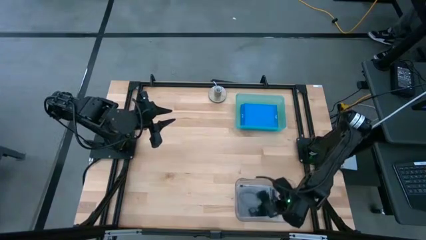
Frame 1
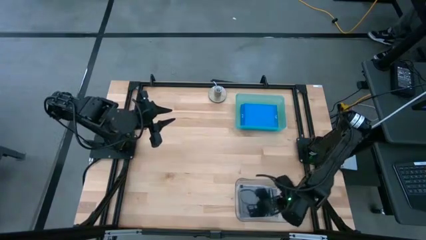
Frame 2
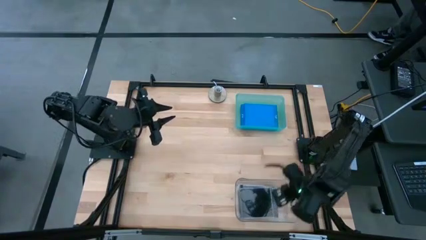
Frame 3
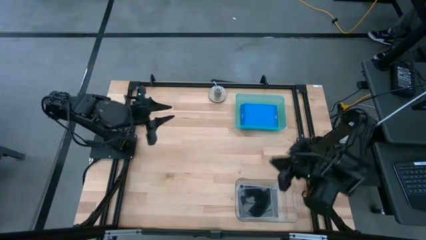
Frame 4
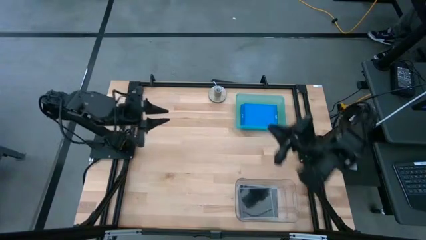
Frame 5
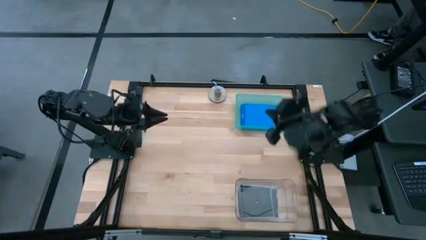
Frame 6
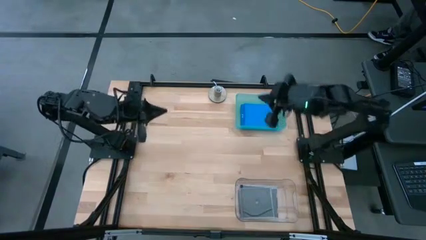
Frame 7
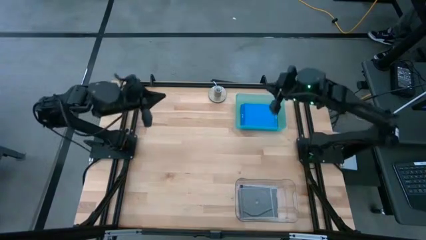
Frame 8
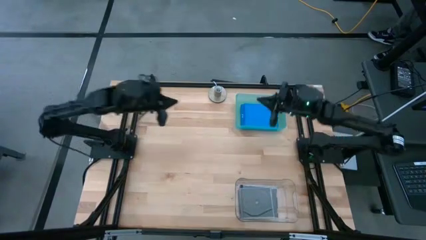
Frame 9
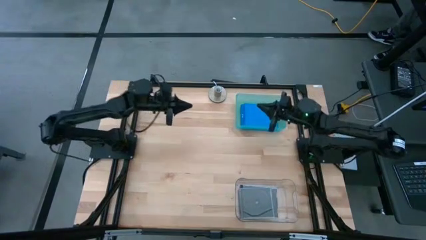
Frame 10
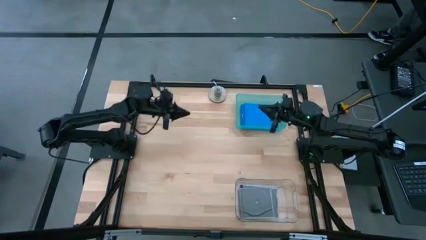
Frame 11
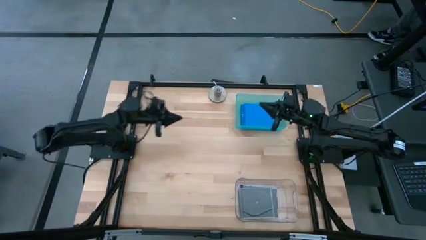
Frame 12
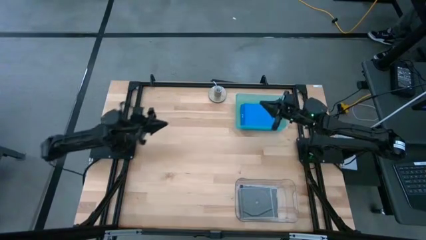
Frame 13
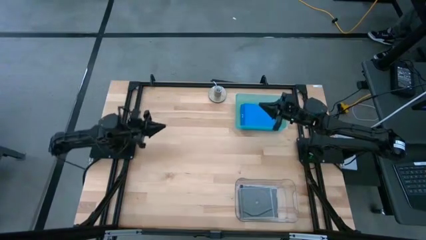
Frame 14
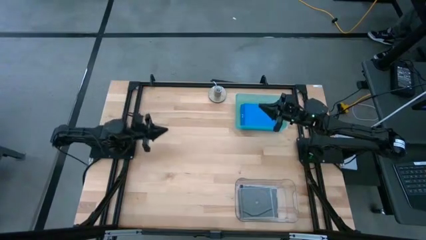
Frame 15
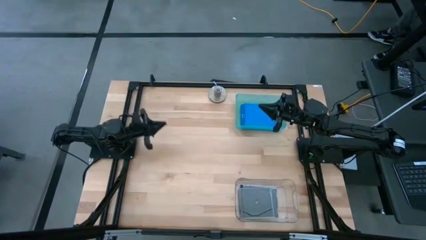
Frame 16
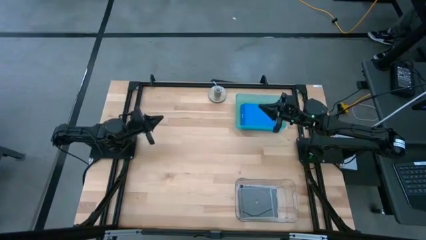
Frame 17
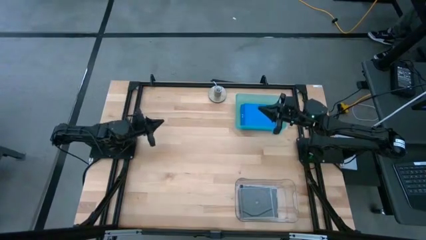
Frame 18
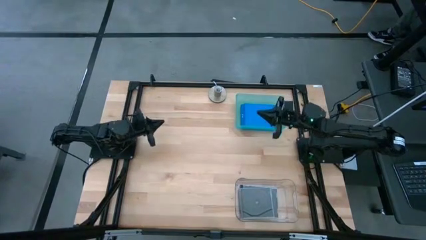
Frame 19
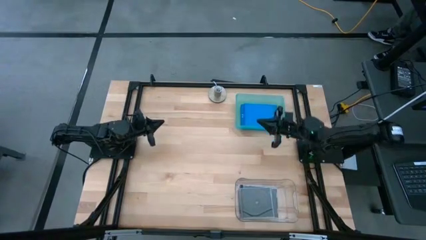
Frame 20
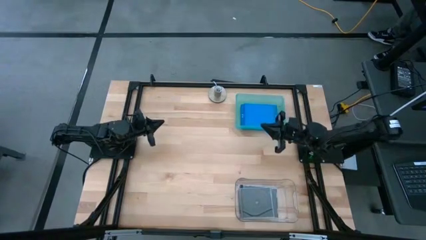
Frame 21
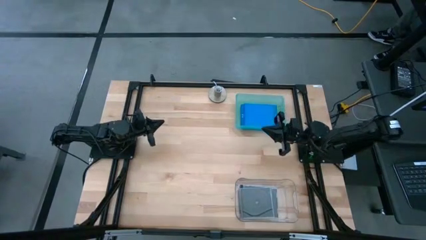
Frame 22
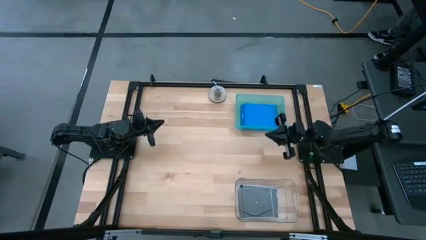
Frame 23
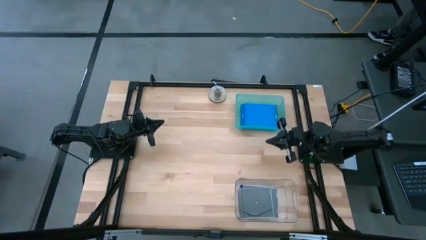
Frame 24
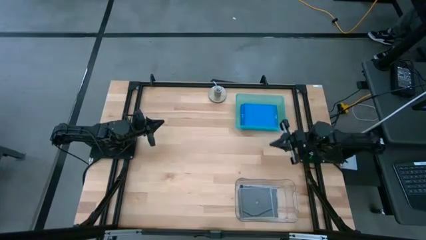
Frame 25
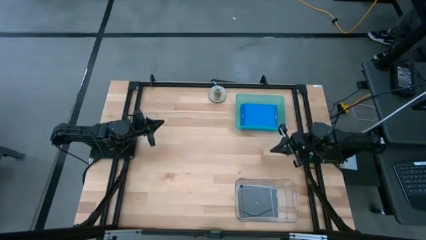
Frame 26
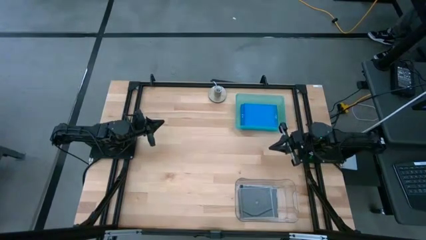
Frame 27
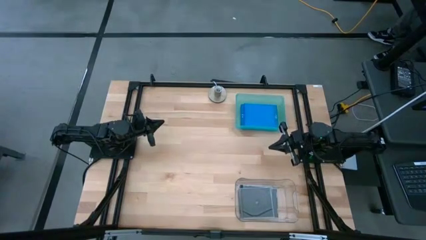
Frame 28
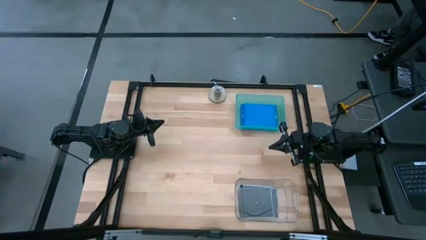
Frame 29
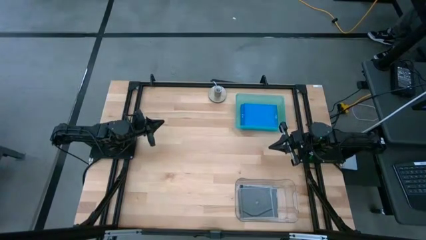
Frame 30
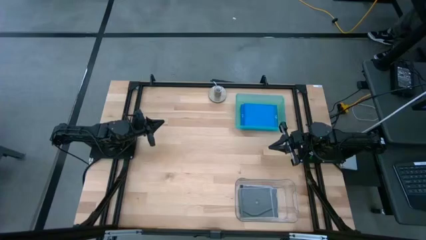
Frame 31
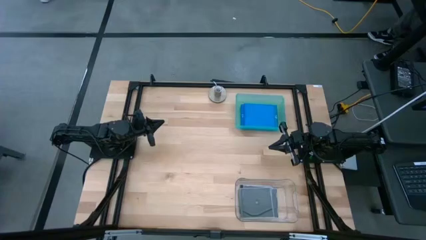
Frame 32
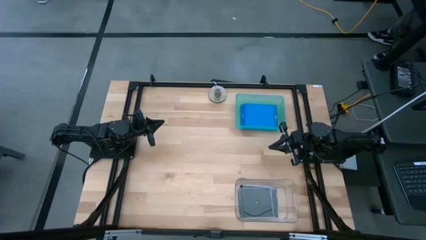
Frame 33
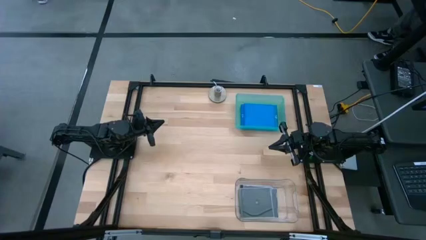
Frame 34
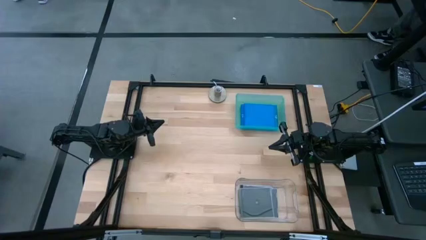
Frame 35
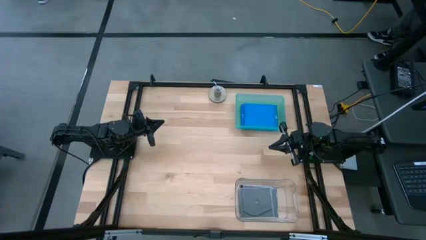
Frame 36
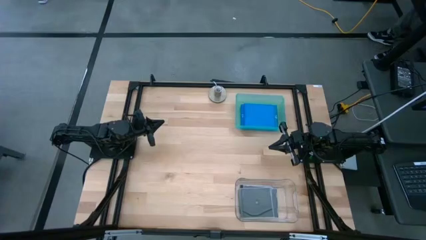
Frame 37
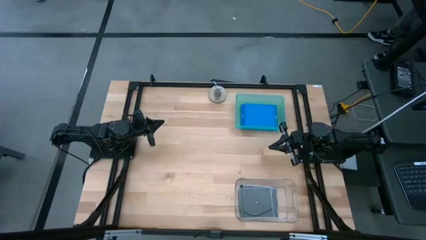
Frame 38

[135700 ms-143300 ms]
Task: Pick & place jewel cases by type
Return to Home Position

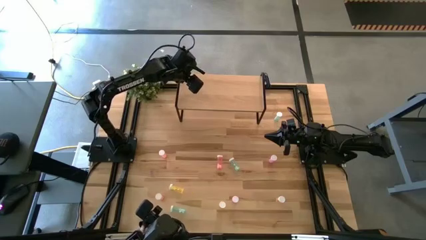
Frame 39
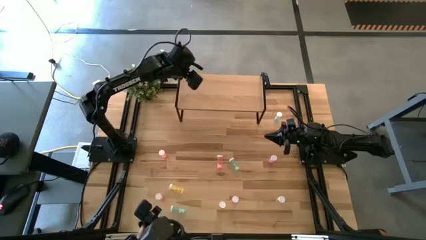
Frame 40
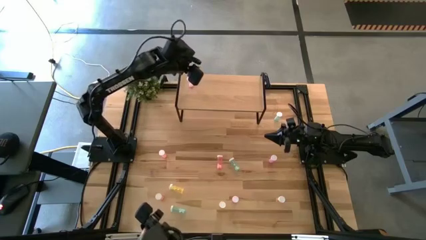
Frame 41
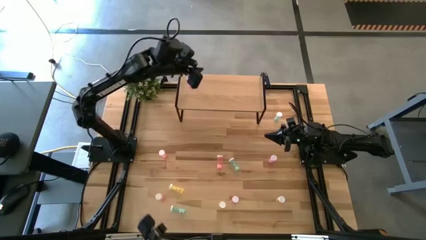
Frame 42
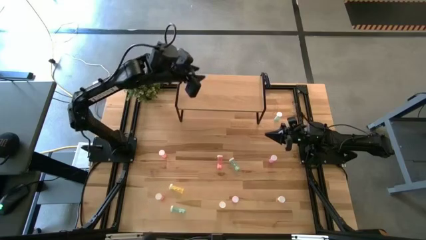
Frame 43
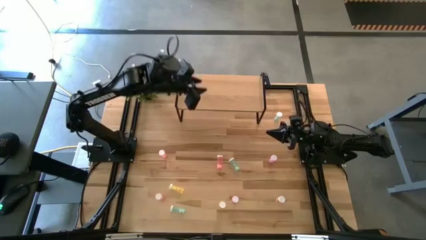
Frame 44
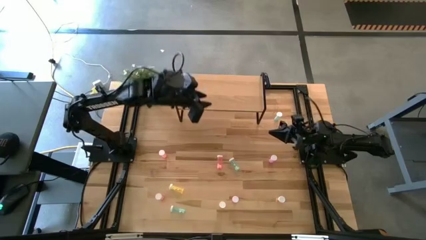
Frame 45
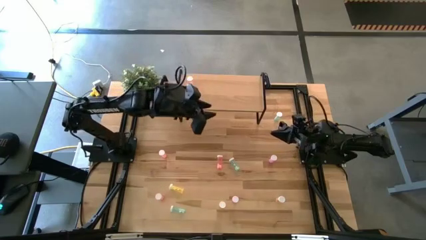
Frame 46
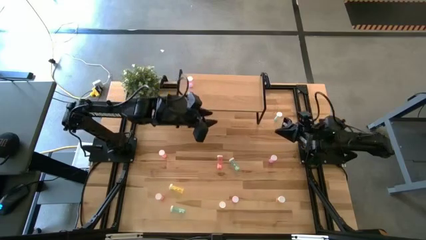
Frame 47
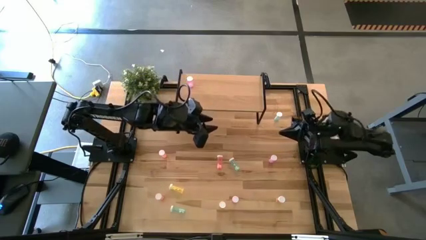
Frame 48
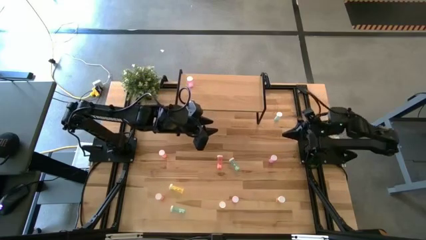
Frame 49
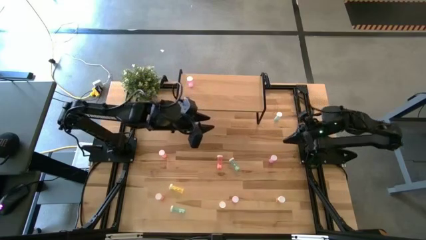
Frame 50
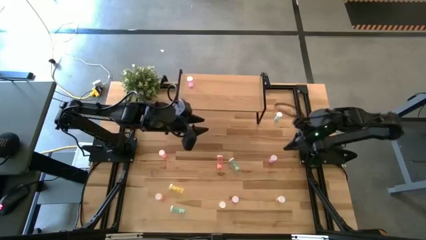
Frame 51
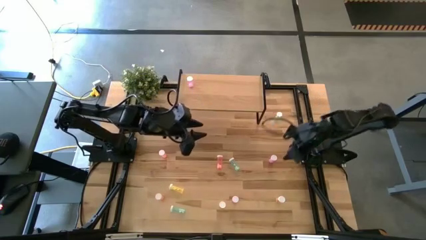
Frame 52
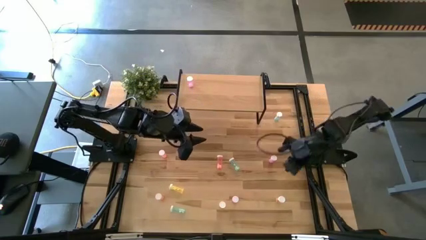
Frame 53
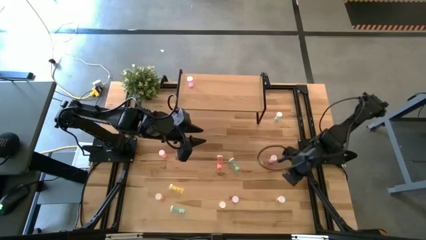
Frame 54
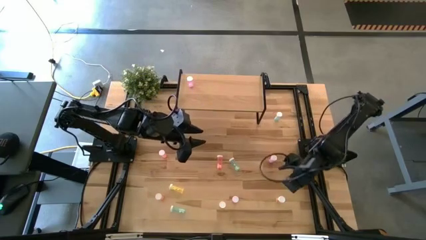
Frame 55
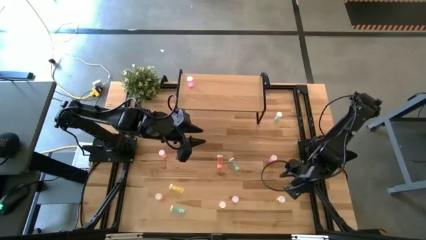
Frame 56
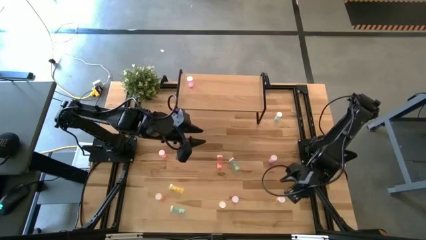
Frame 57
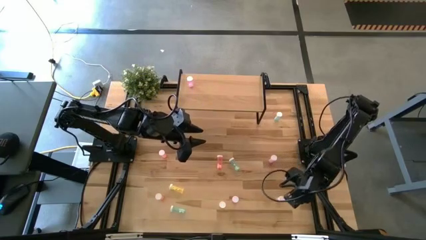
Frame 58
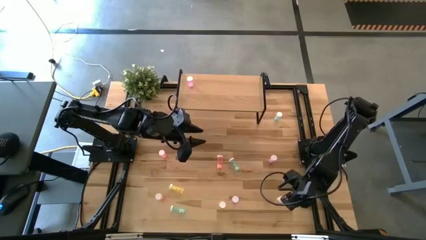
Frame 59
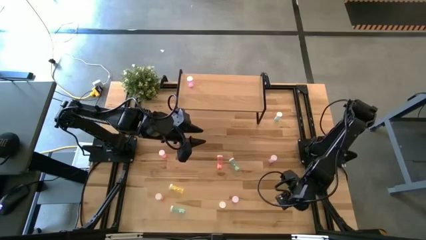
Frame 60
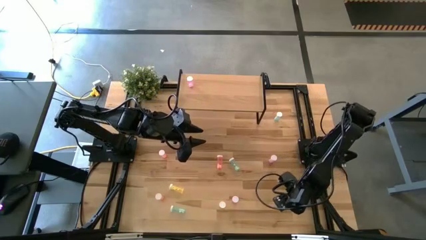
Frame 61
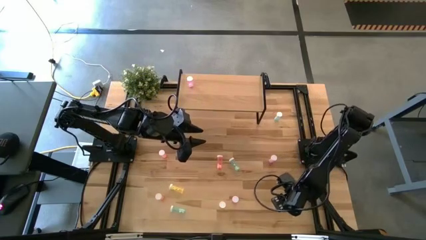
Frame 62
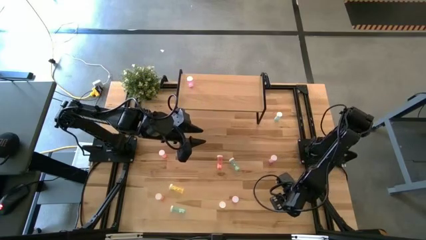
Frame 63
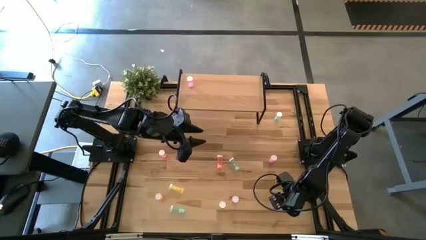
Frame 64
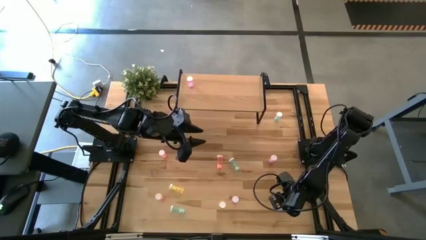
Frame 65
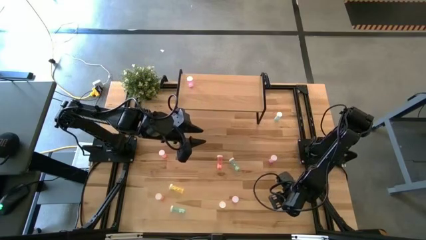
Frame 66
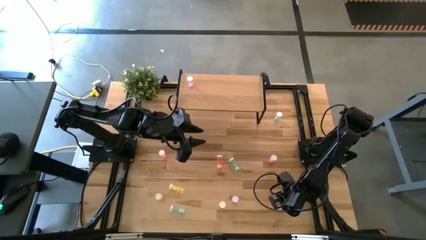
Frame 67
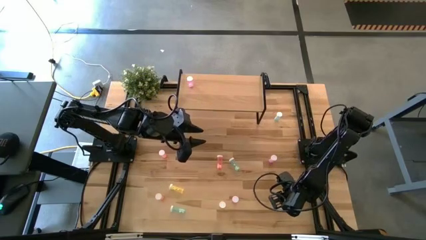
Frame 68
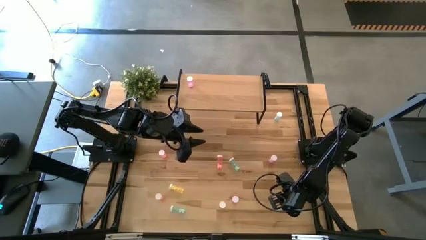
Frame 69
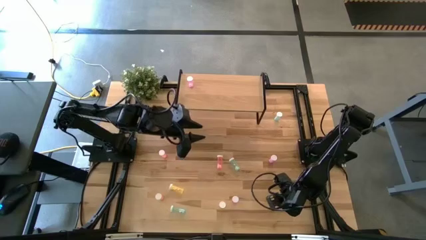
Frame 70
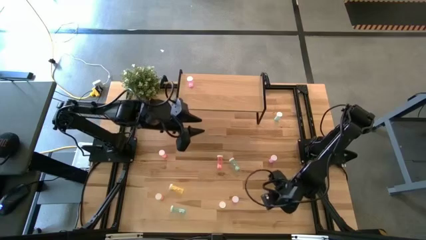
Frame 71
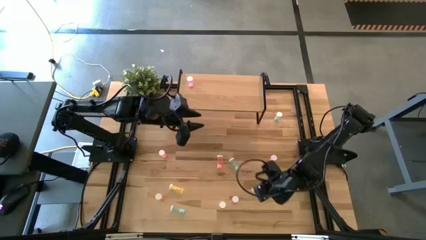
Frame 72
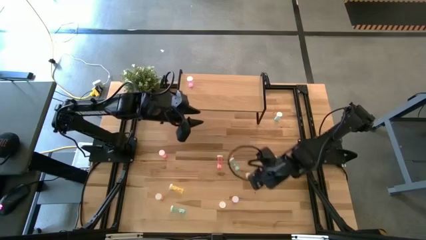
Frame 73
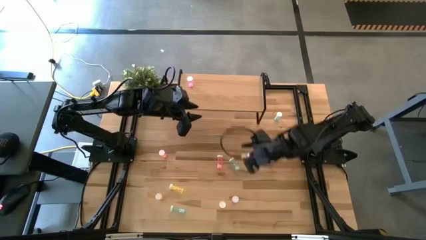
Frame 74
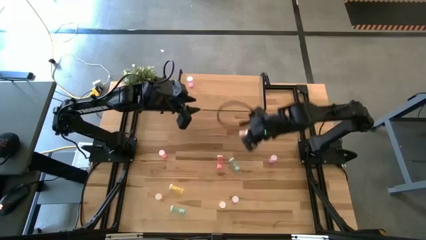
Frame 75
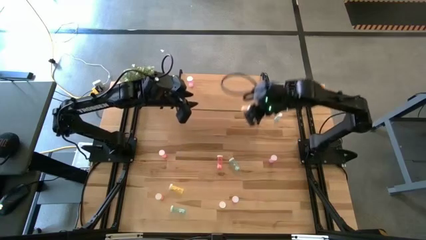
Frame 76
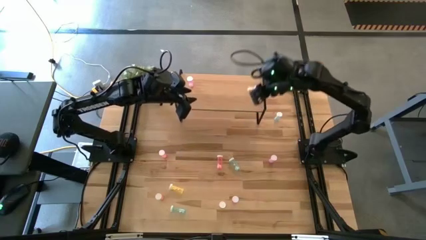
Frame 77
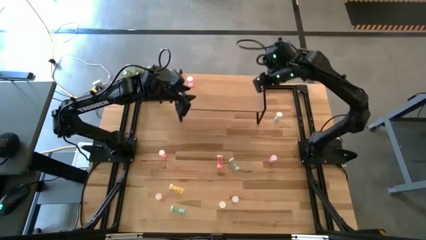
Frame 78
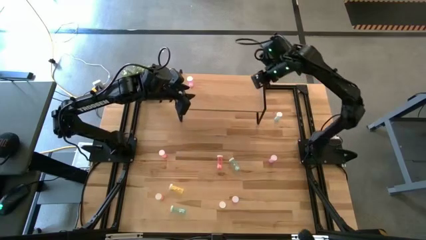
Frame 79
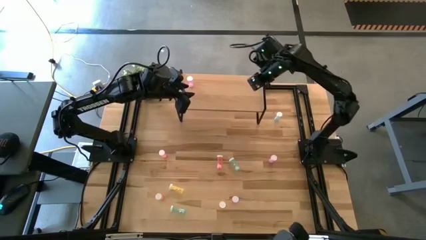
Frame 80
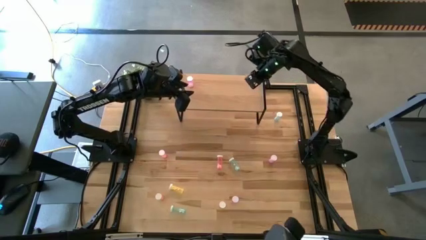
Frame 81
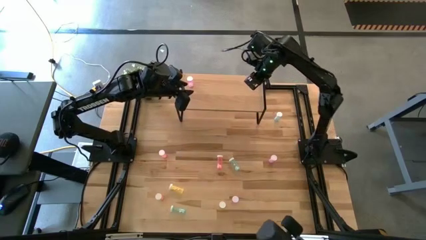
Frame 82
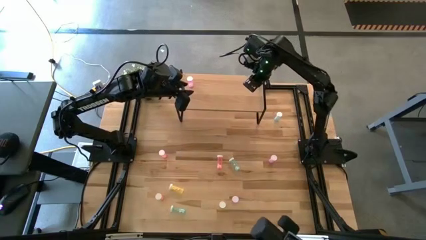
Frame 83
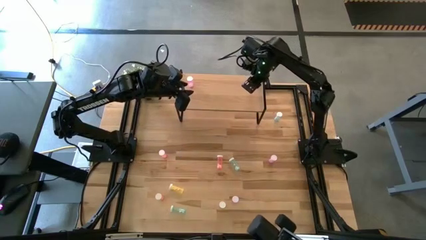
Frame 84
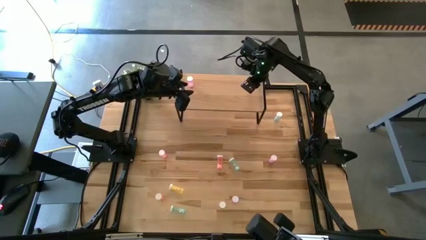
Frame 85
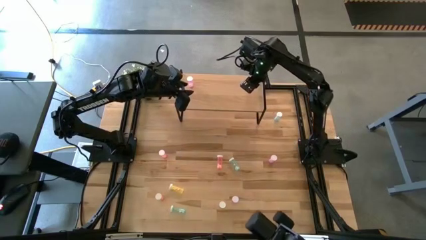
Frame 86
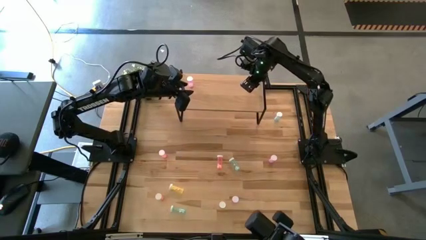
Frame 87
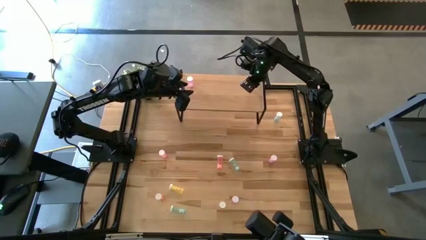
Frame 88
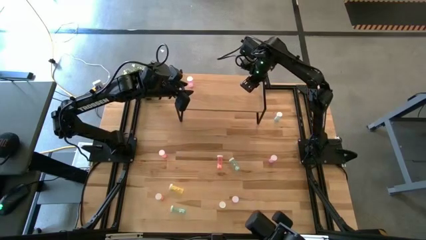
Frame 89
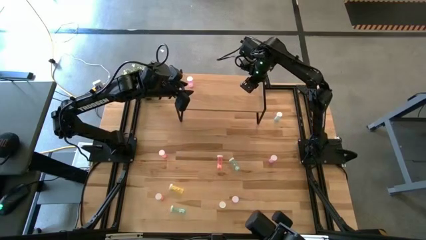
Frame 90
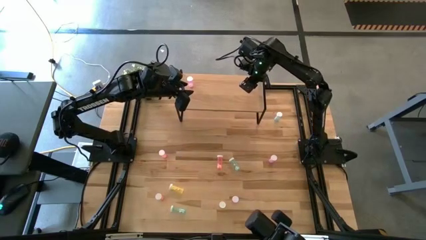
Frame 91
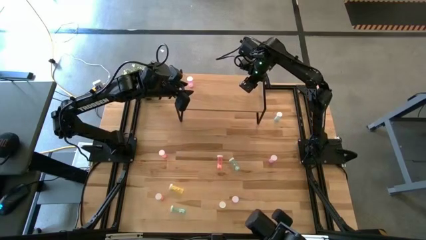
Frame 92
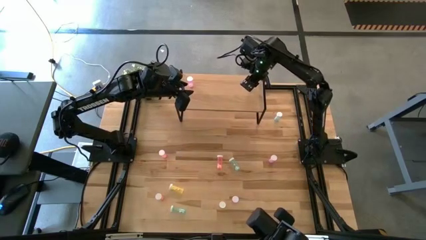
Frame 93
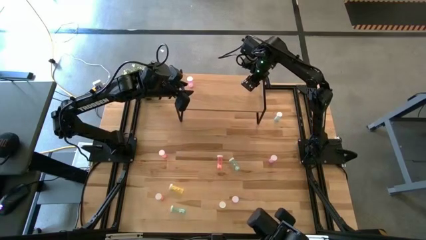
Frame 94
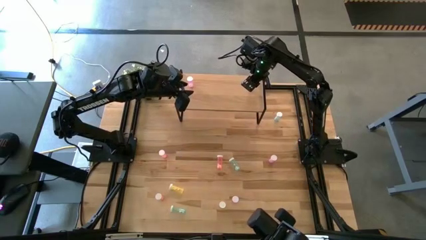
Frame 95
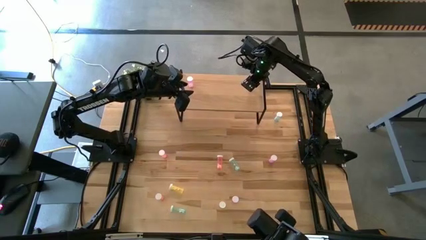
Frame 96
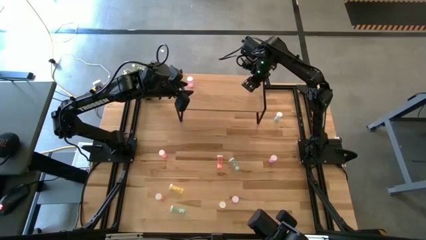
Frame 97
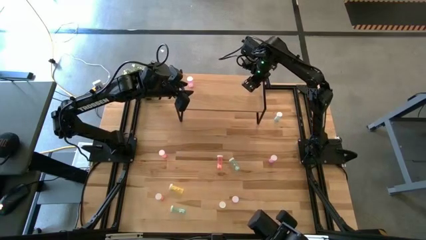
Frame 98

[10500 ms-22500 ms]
Task: Pick and place medicine bottles onto shelf by color
Put the right yellow pill bottle on the shelf
